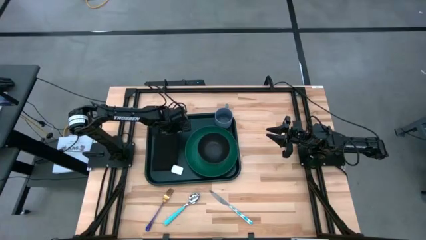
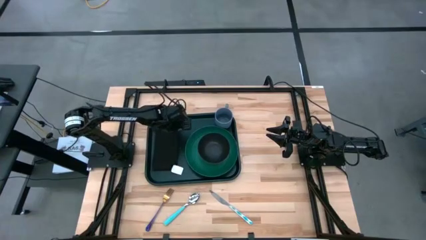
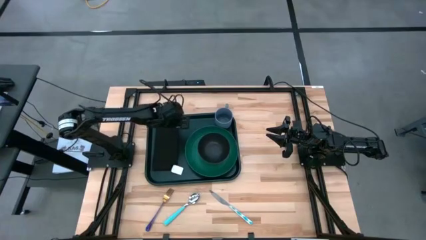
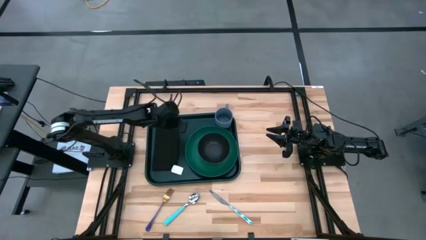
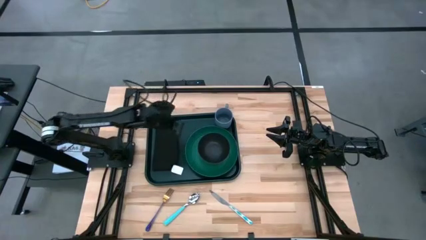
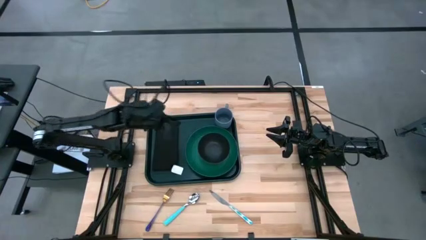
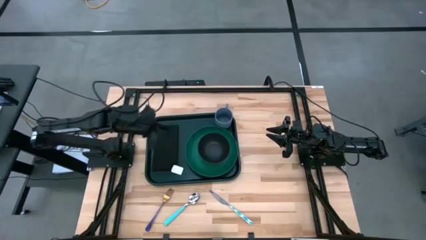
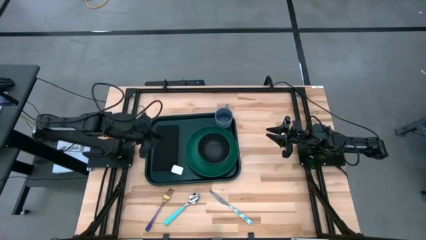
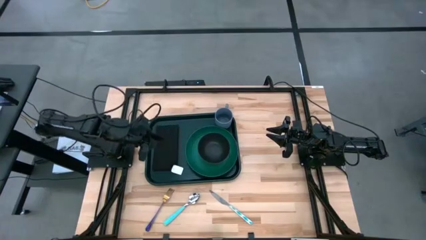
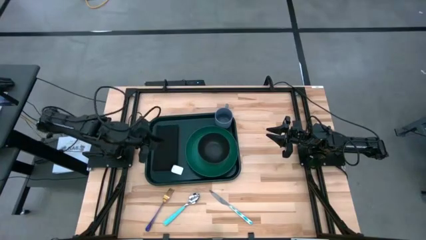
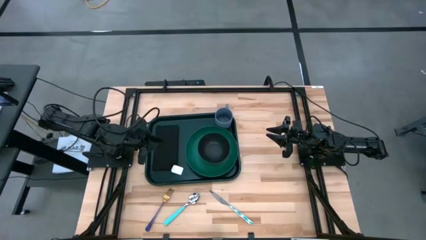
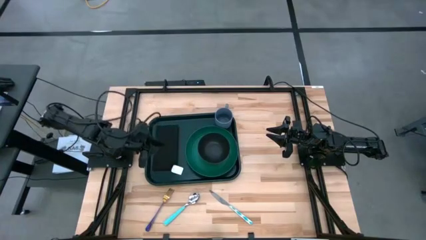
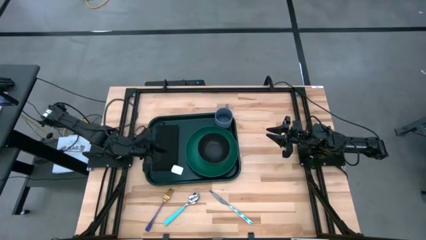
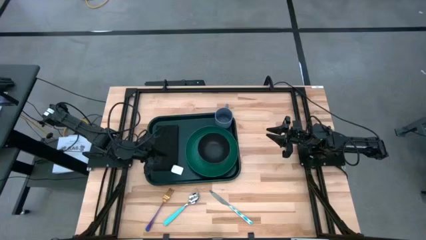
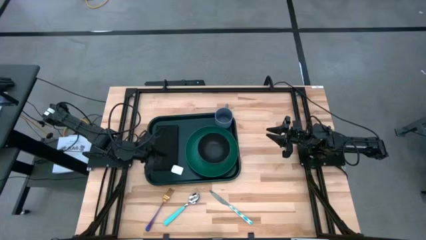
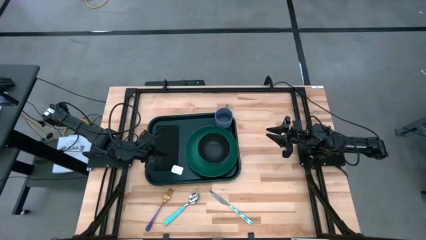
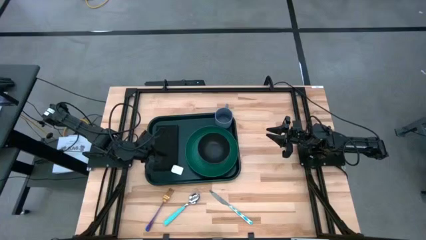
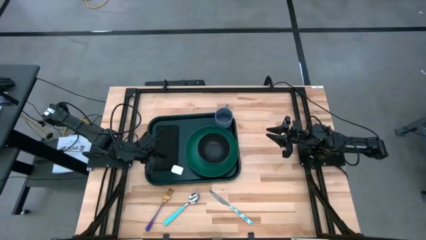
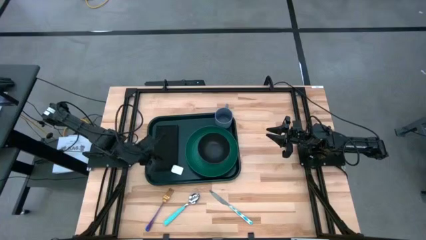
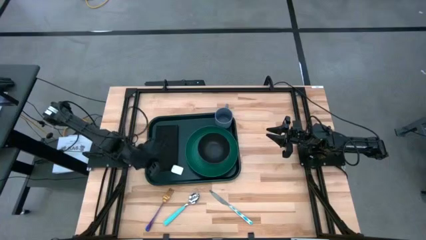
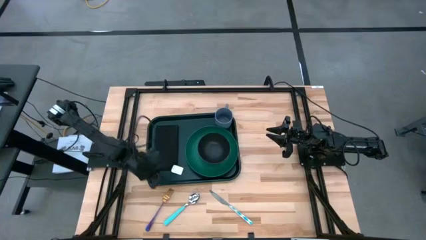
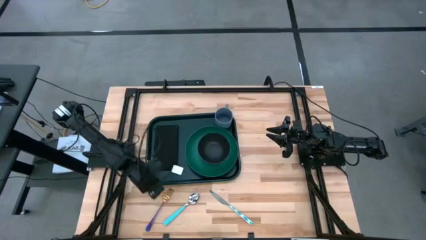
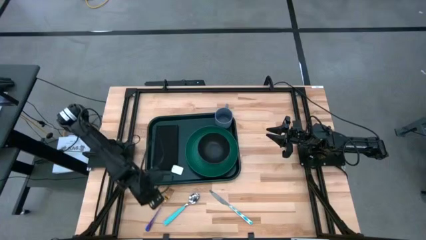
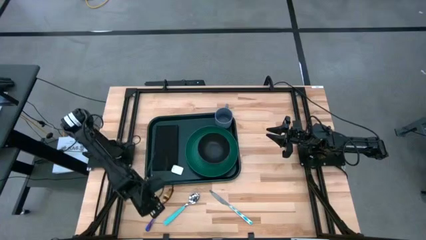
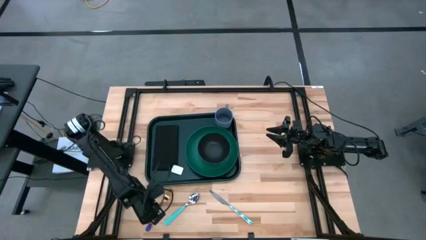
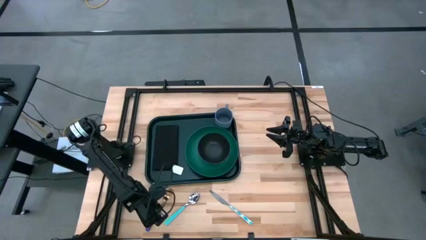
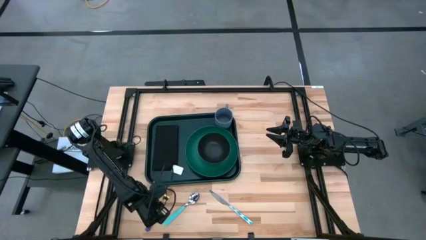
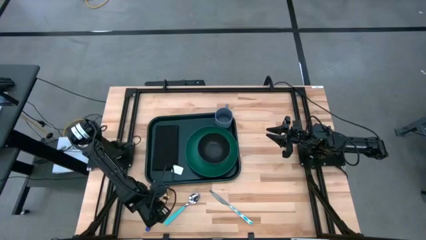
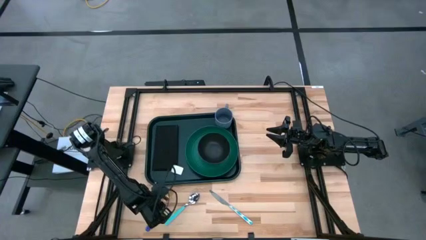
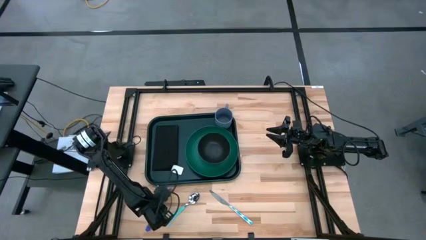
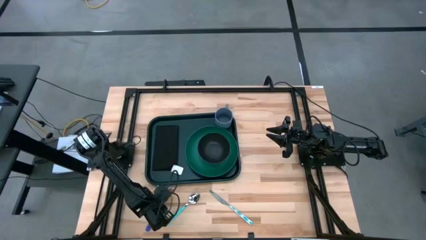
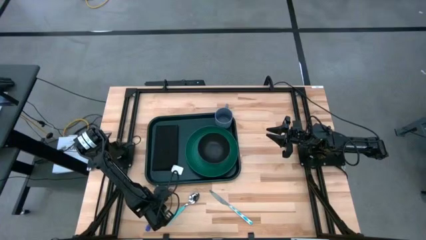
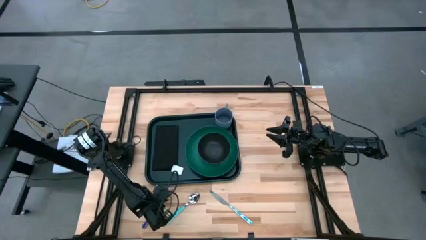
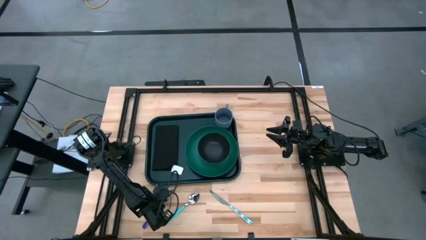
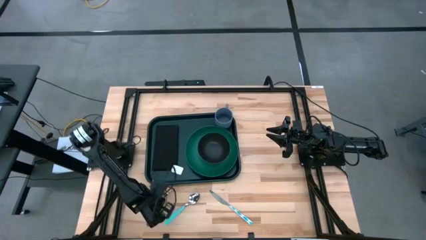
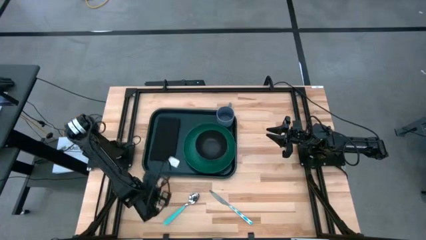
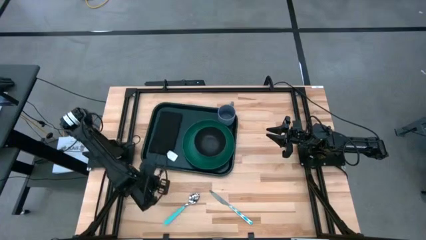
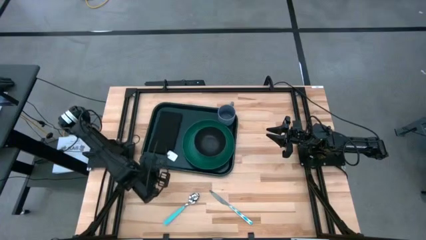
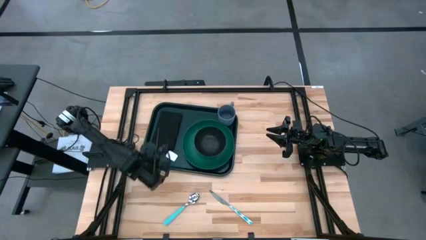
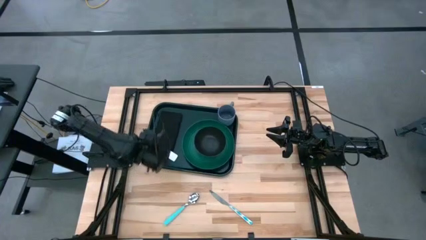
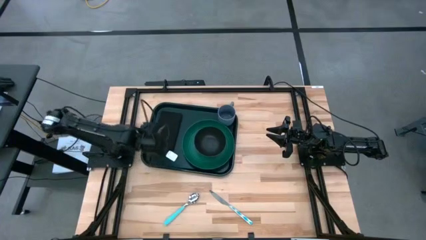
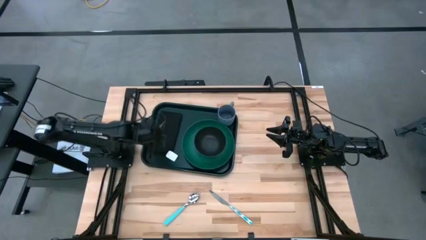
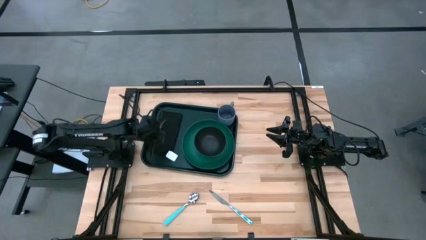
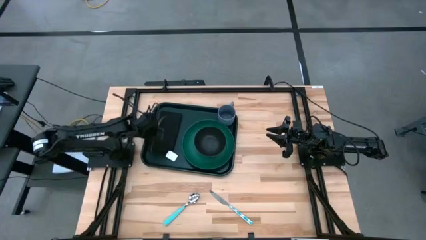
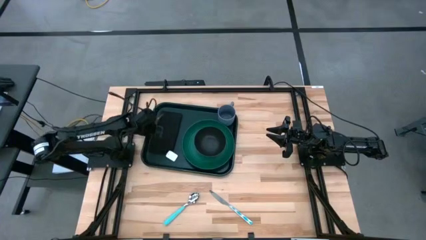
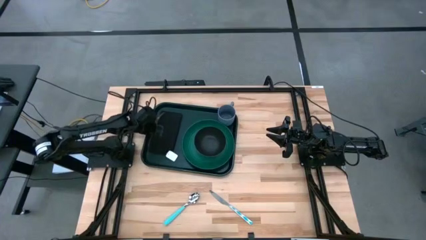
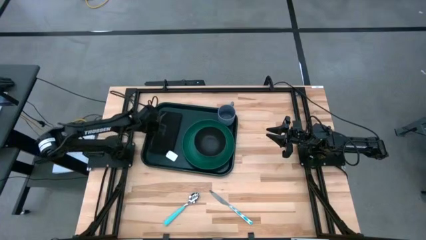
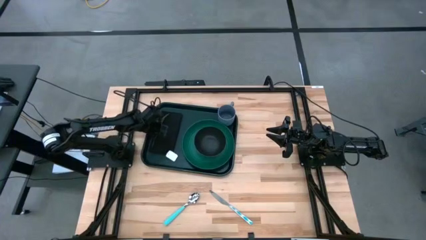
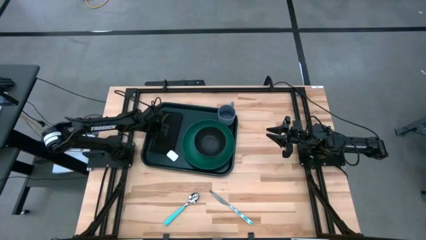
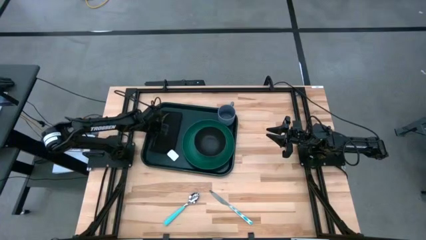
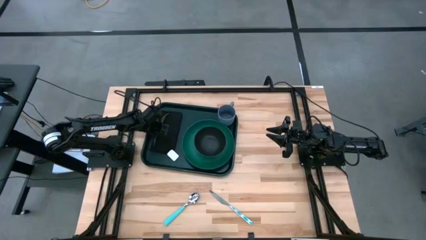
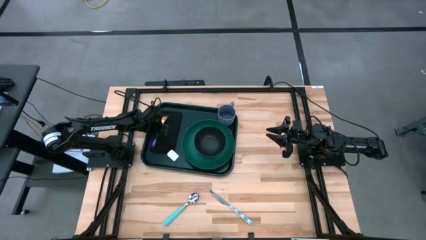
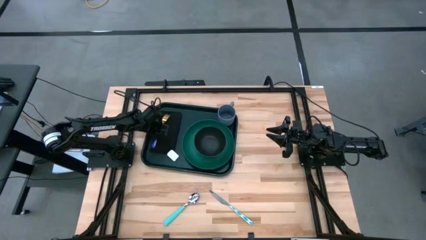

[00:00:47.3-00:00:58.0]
Task: Set up tray
Put the violet fork on the black tray on top of the napkin

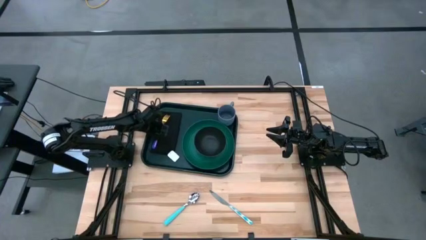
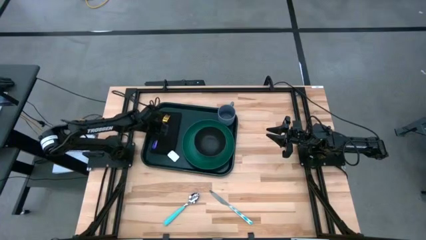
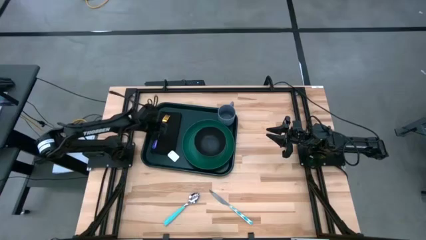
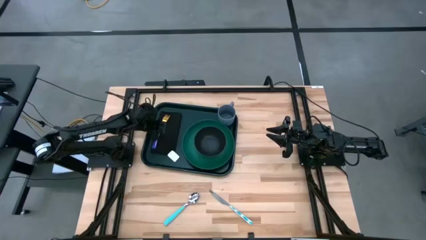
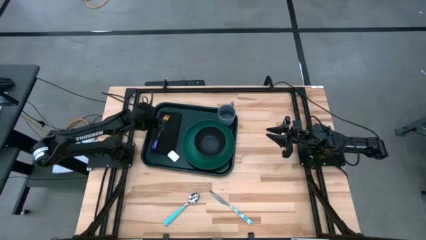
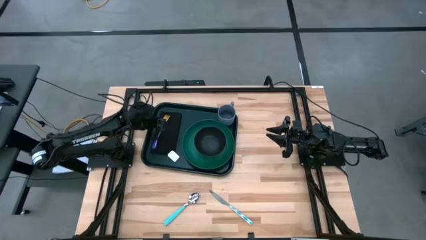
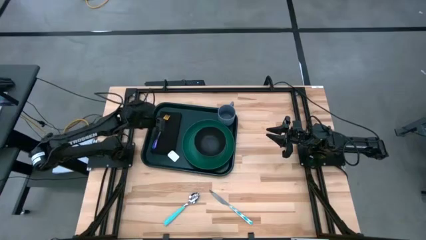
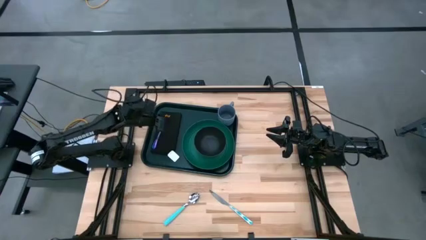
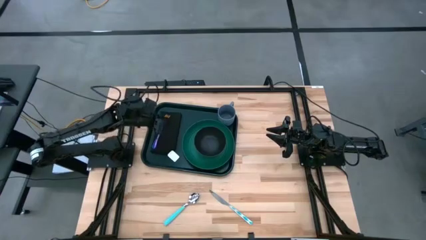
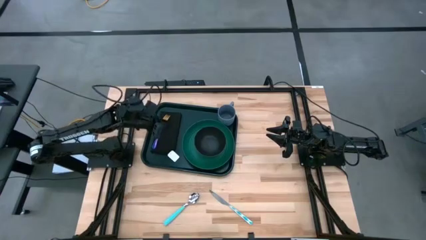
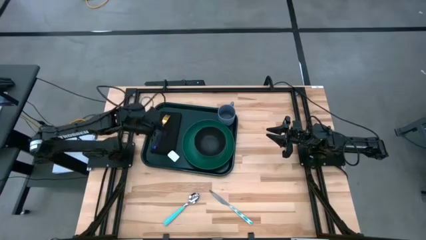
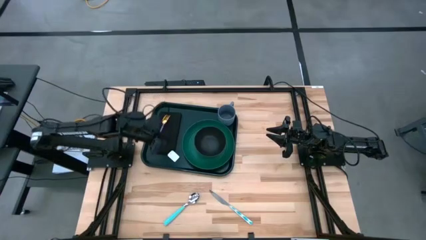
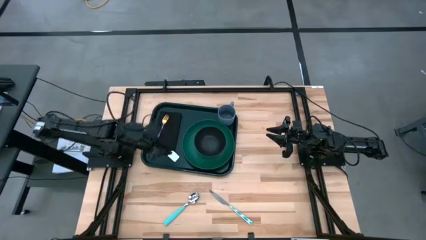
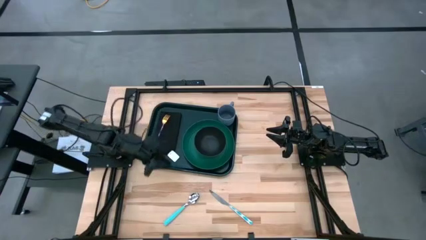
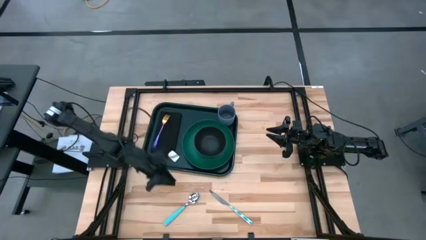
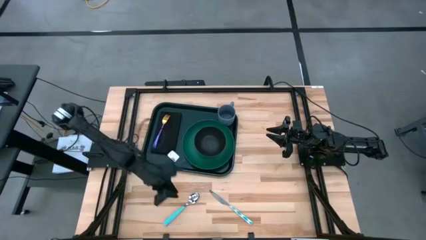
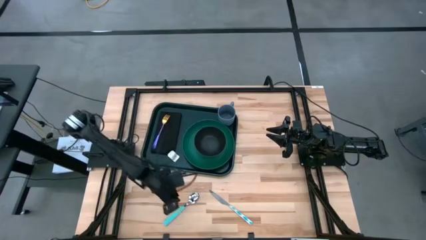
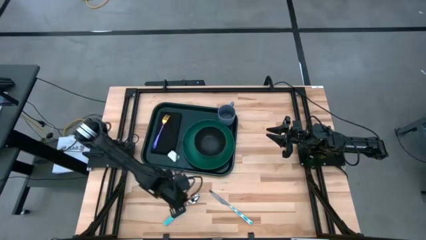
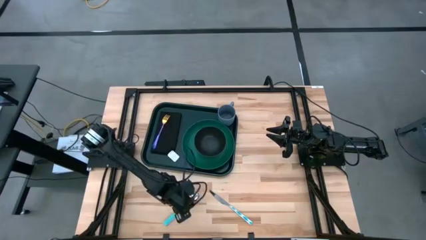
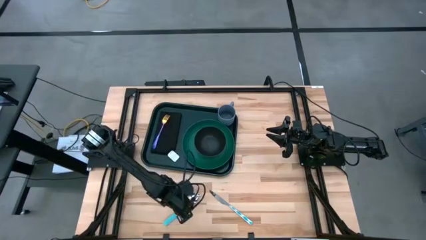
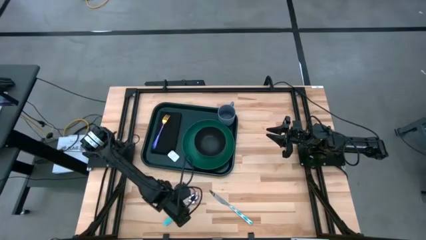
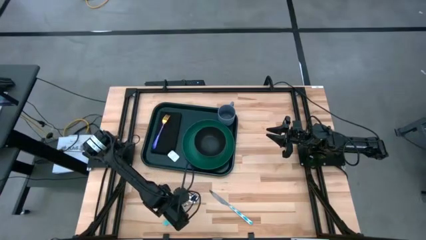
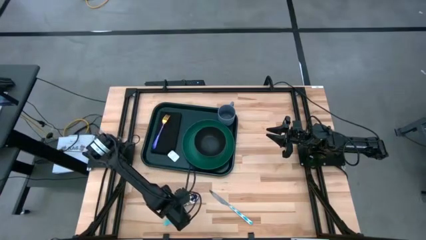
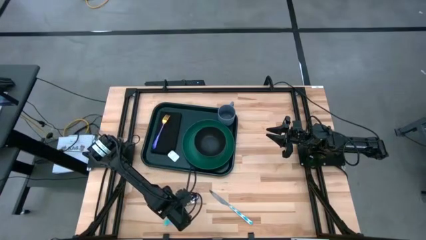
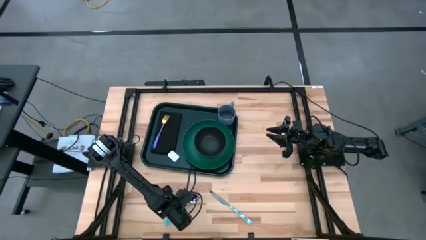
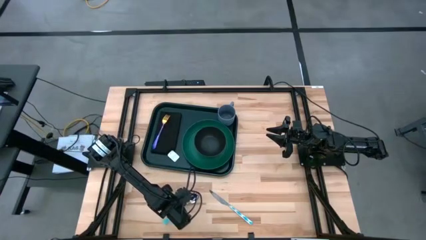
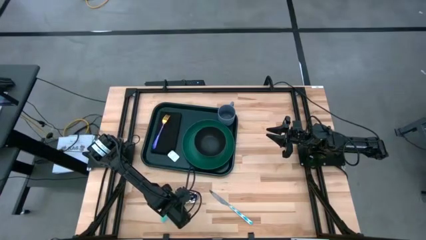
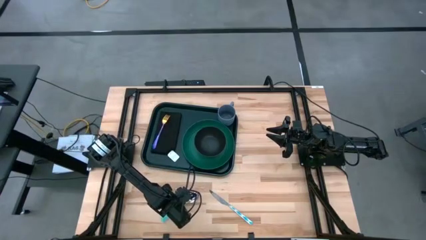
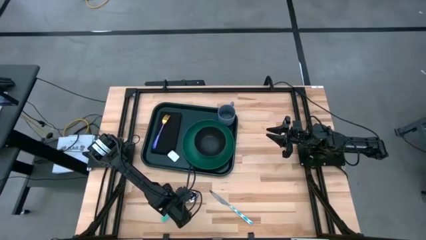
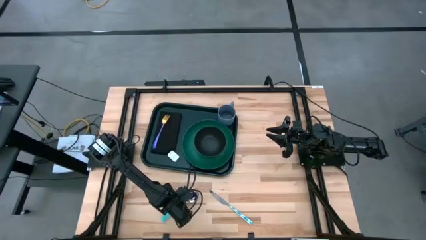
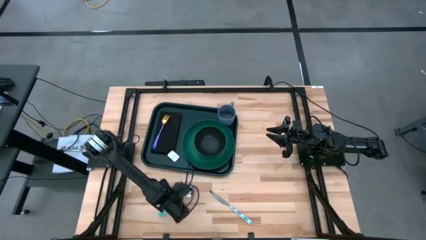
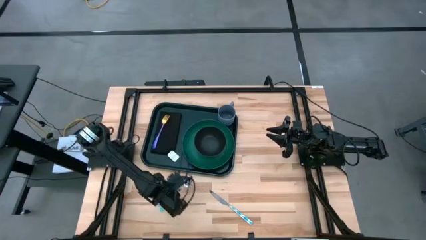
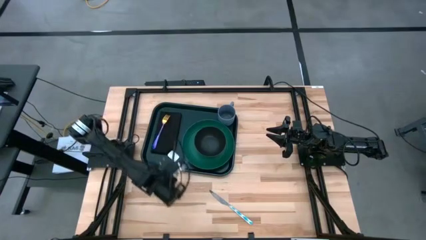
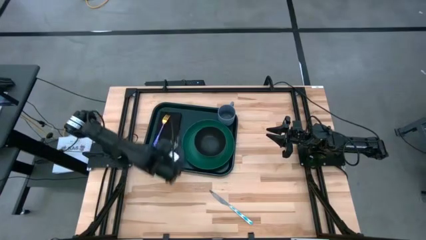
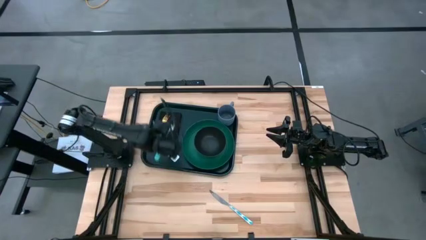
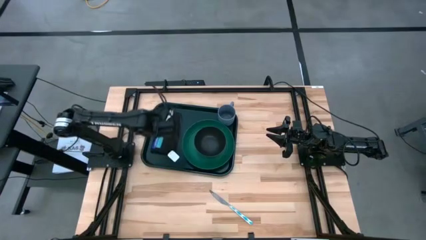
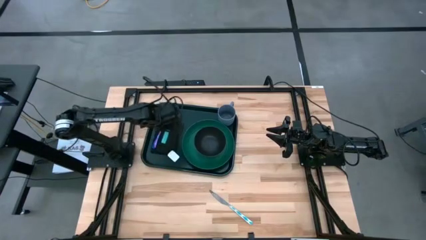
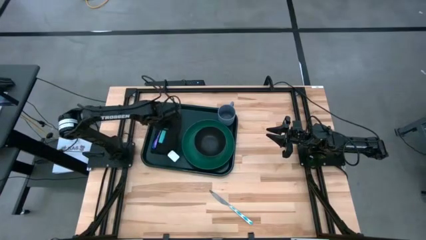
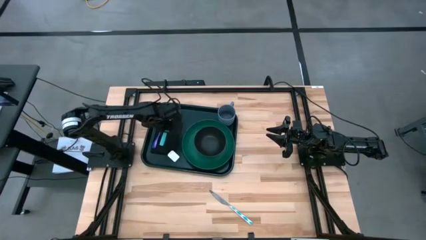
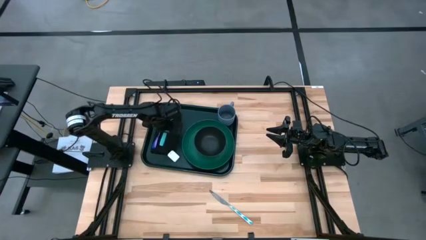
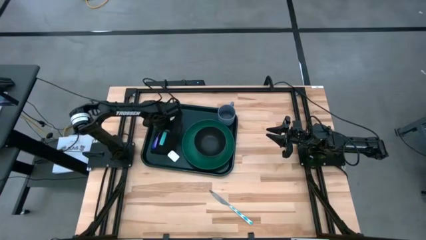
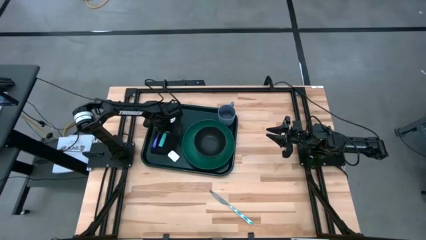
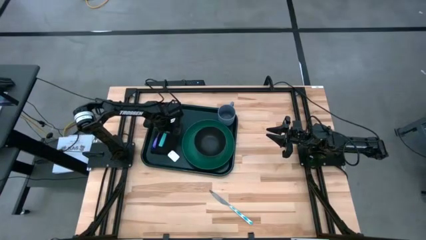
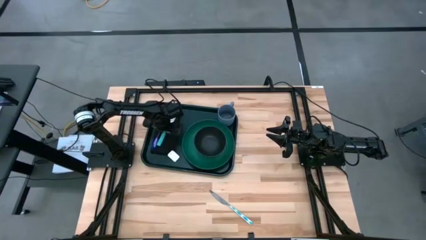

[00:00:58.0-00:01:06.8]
Put the blue spoon on the black tray on top of the napkin
